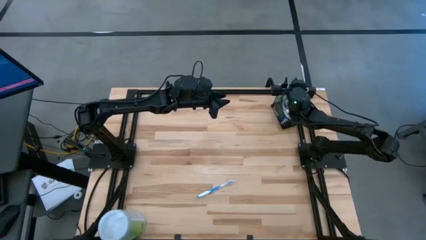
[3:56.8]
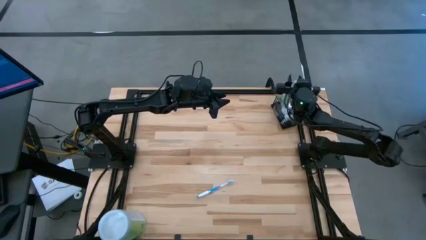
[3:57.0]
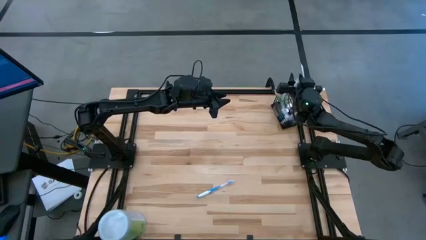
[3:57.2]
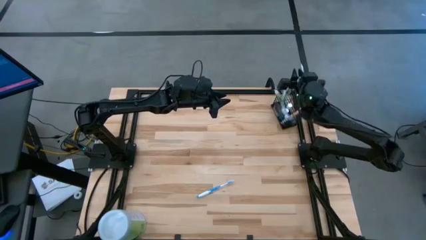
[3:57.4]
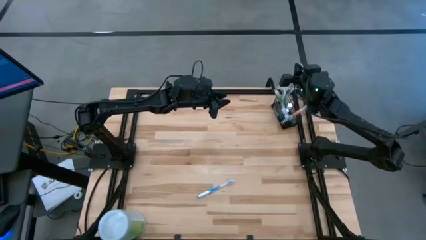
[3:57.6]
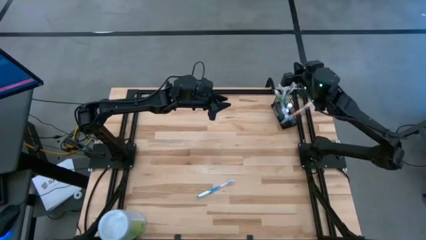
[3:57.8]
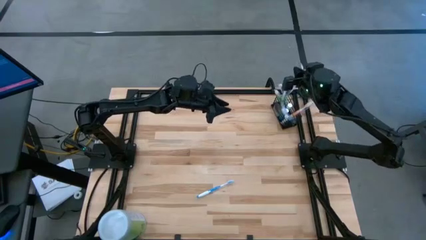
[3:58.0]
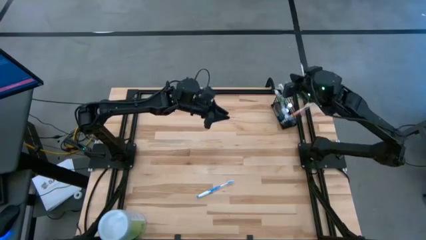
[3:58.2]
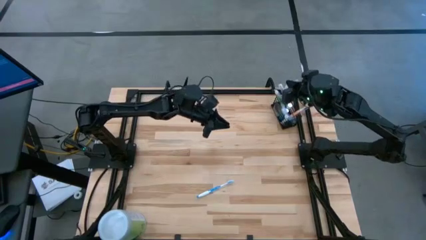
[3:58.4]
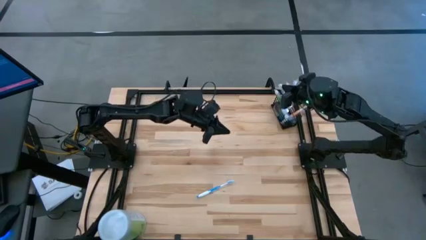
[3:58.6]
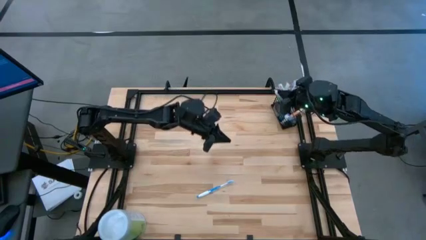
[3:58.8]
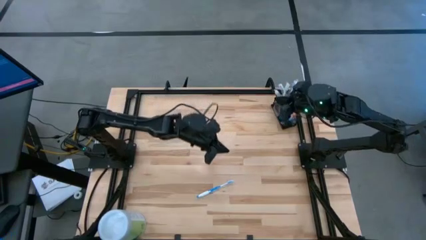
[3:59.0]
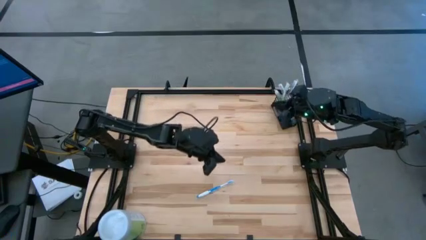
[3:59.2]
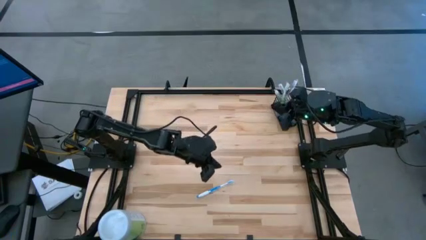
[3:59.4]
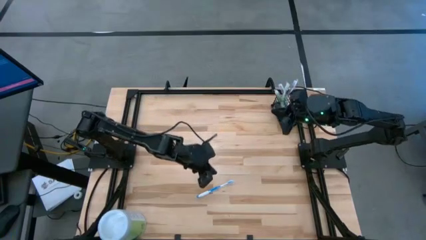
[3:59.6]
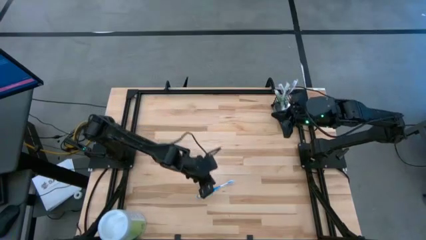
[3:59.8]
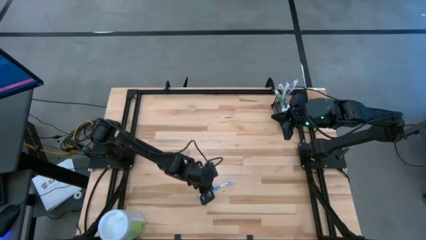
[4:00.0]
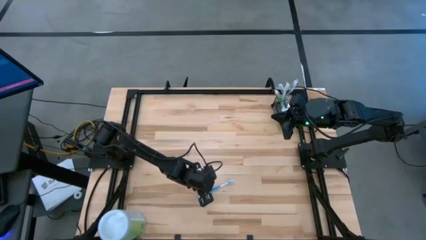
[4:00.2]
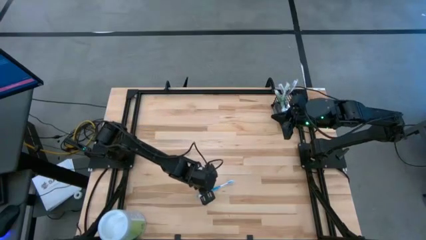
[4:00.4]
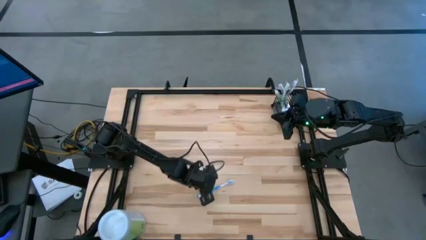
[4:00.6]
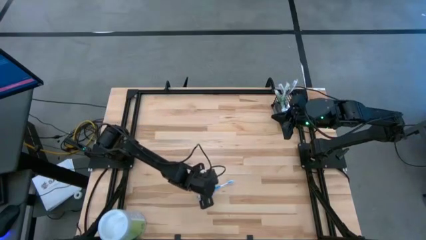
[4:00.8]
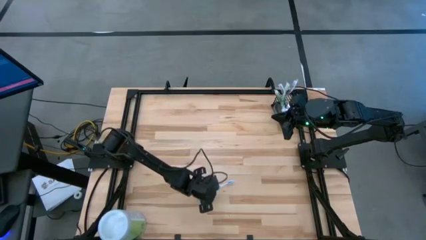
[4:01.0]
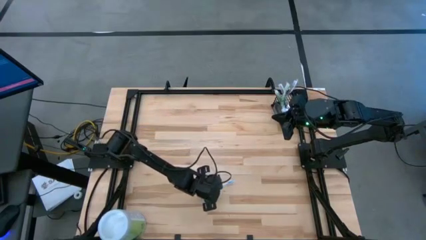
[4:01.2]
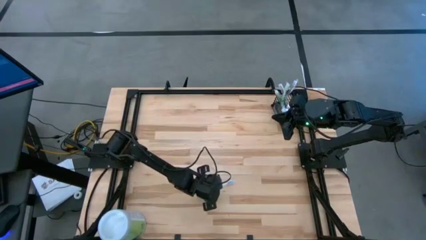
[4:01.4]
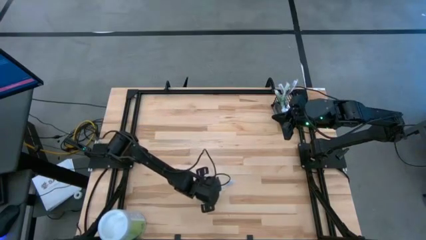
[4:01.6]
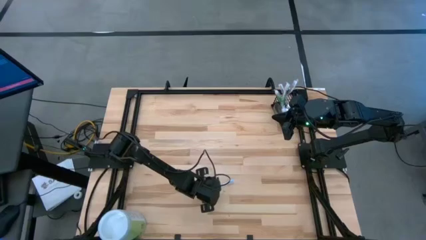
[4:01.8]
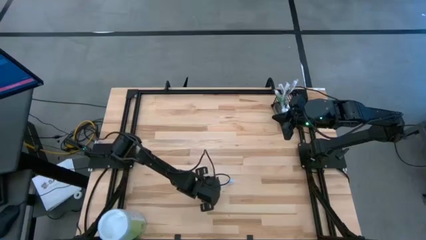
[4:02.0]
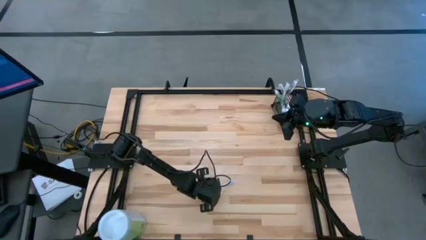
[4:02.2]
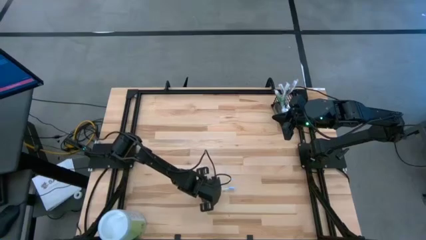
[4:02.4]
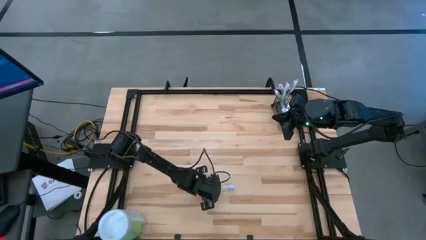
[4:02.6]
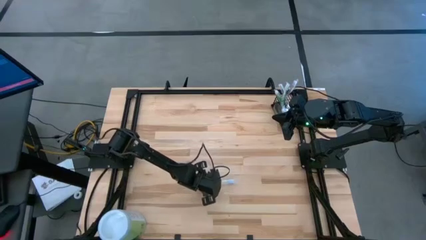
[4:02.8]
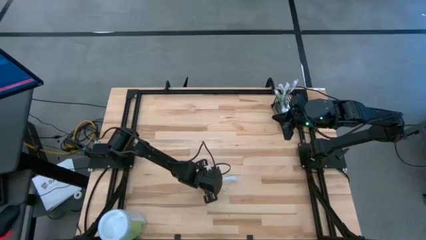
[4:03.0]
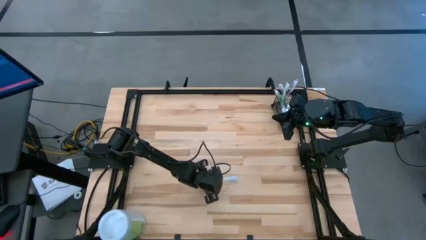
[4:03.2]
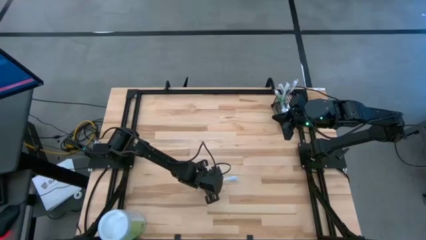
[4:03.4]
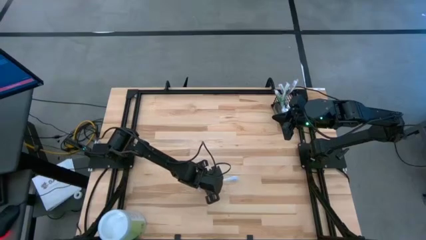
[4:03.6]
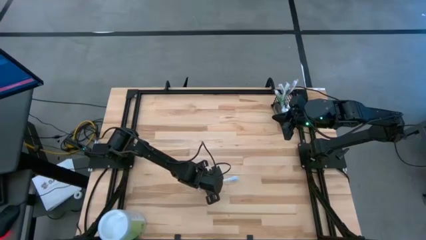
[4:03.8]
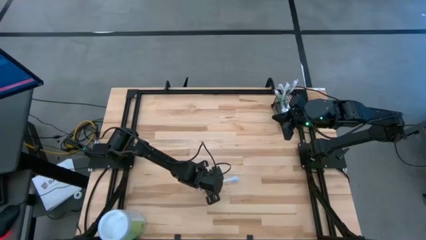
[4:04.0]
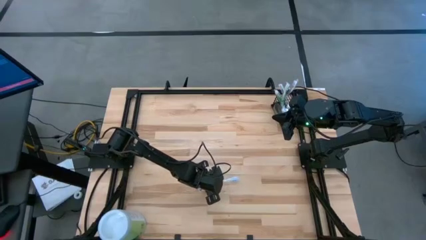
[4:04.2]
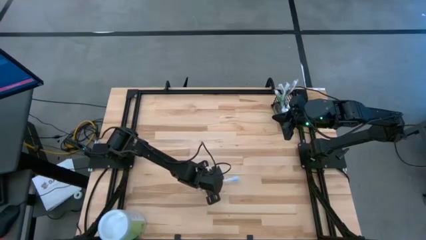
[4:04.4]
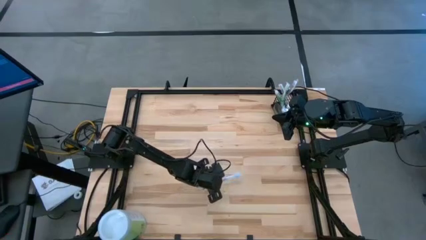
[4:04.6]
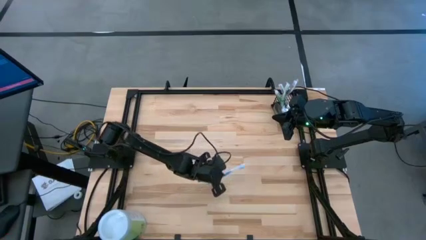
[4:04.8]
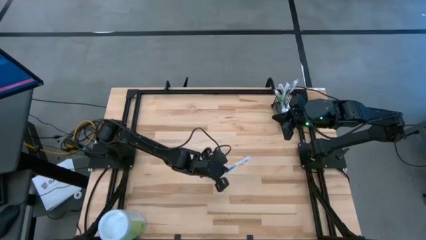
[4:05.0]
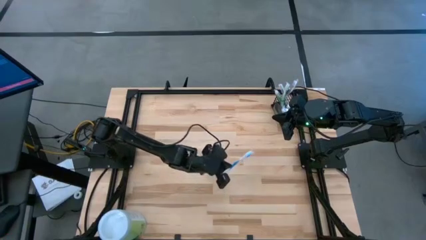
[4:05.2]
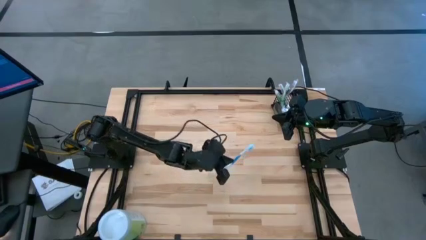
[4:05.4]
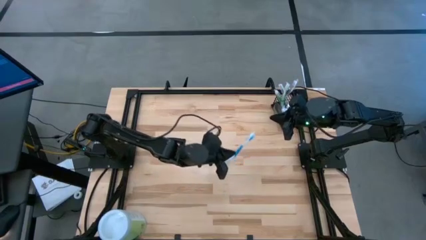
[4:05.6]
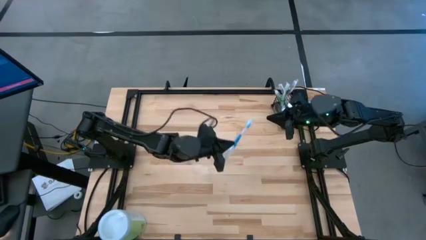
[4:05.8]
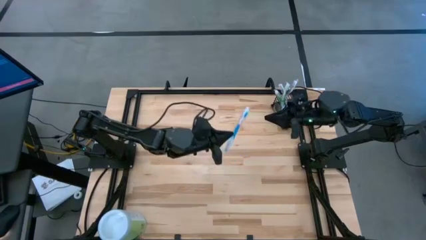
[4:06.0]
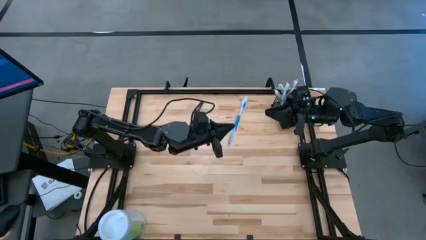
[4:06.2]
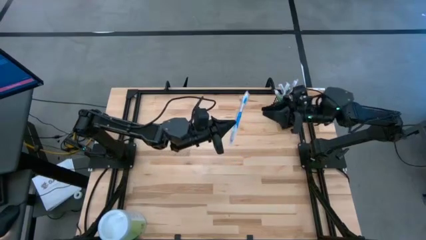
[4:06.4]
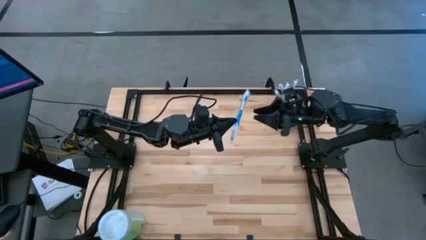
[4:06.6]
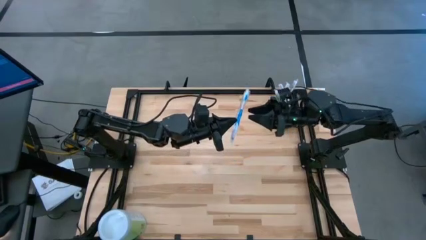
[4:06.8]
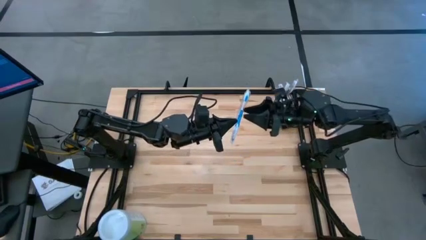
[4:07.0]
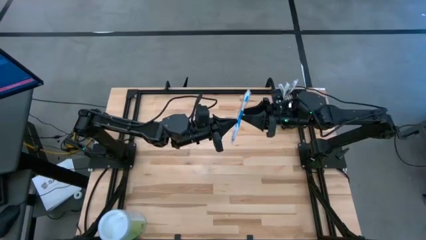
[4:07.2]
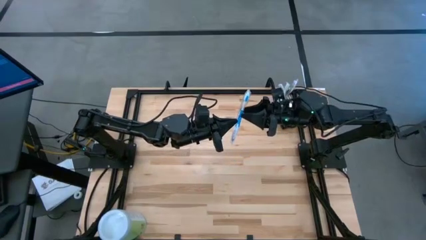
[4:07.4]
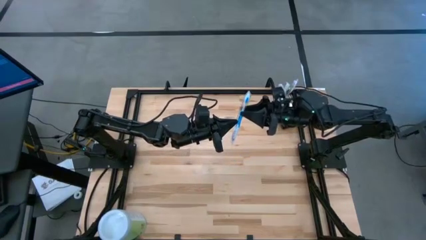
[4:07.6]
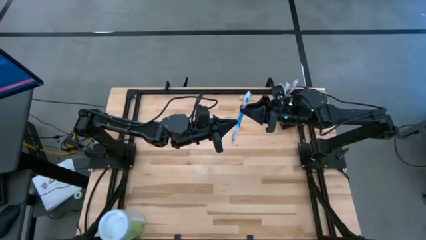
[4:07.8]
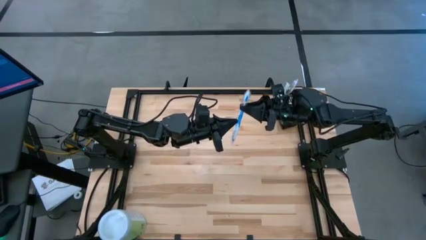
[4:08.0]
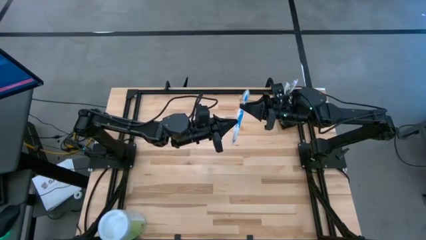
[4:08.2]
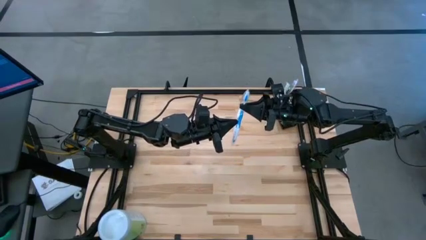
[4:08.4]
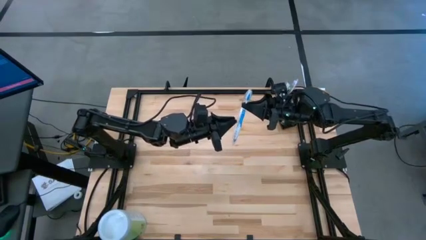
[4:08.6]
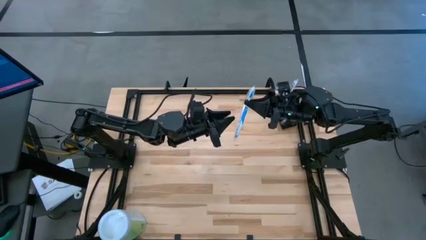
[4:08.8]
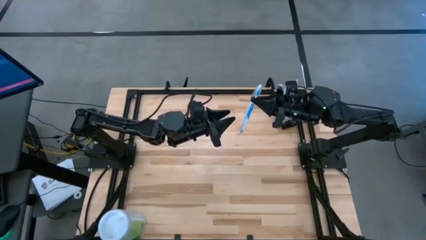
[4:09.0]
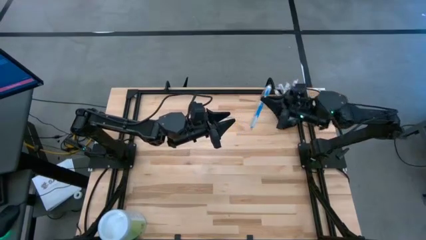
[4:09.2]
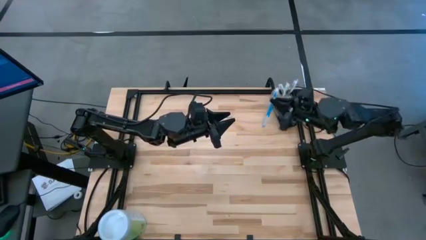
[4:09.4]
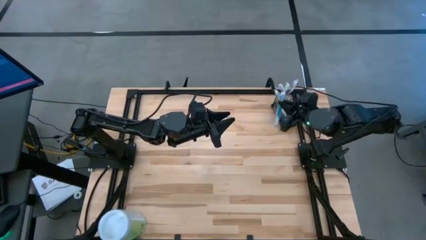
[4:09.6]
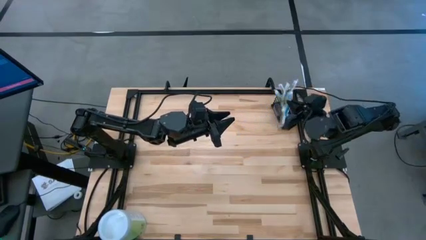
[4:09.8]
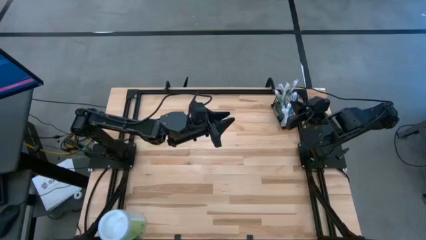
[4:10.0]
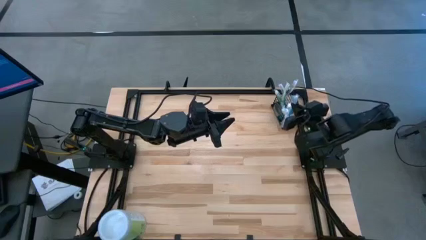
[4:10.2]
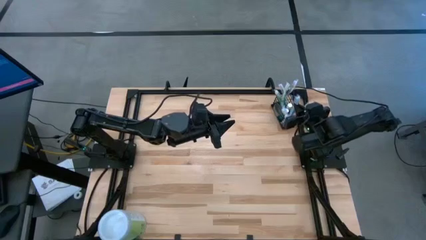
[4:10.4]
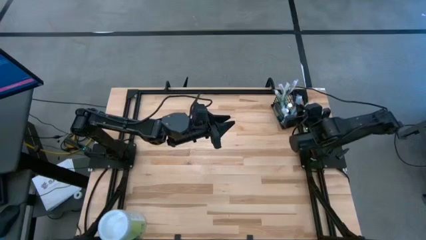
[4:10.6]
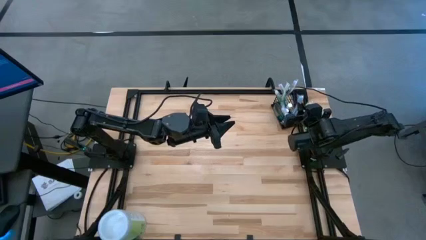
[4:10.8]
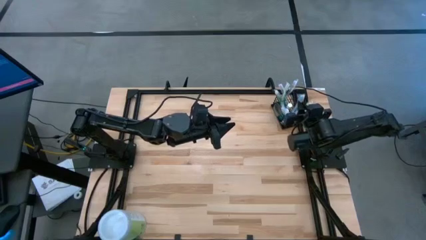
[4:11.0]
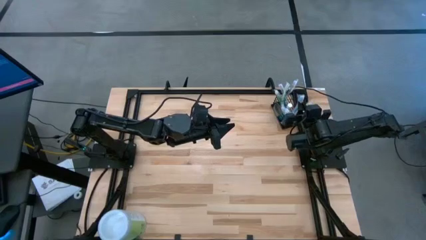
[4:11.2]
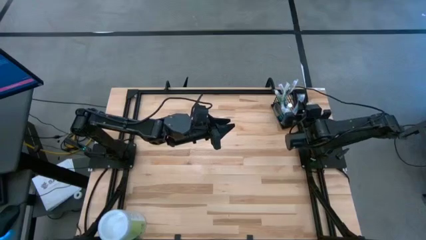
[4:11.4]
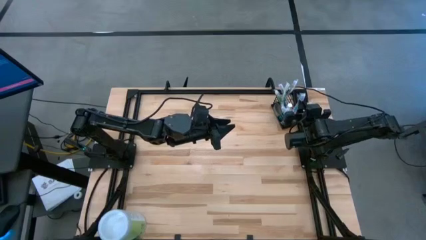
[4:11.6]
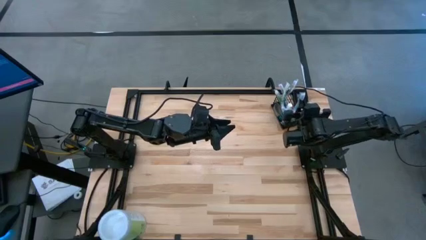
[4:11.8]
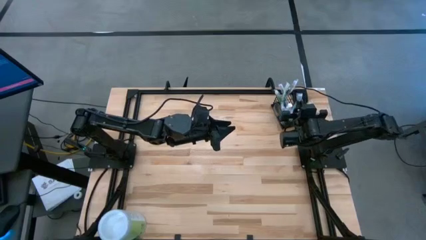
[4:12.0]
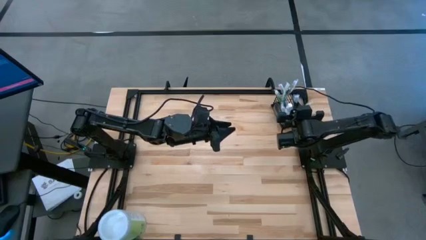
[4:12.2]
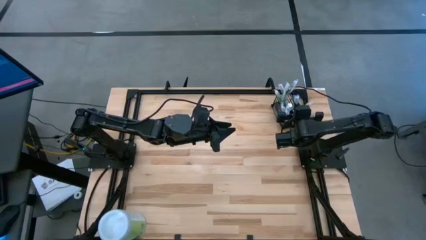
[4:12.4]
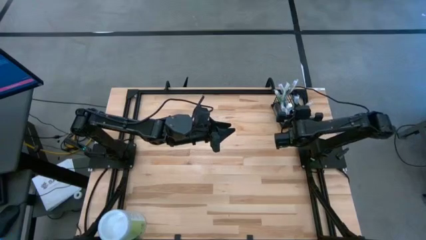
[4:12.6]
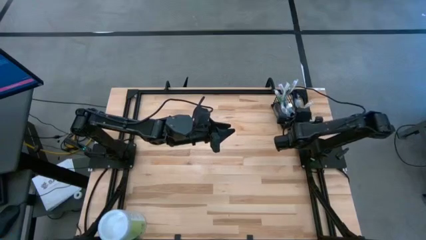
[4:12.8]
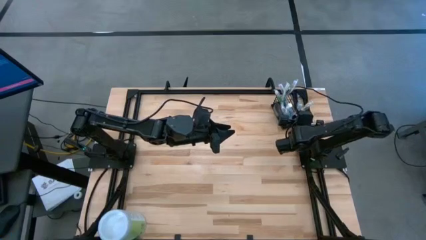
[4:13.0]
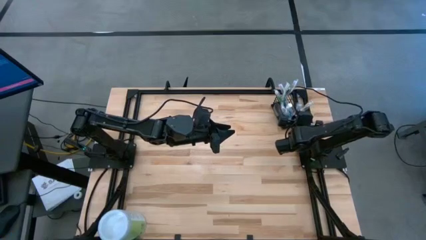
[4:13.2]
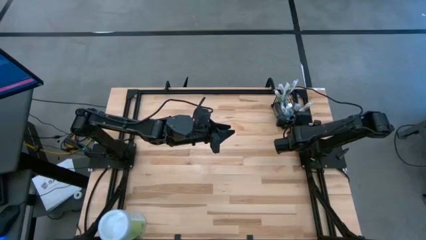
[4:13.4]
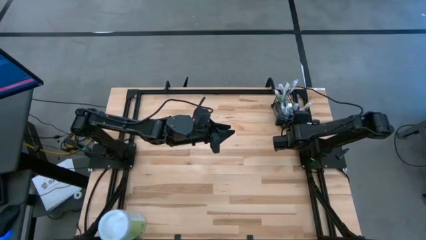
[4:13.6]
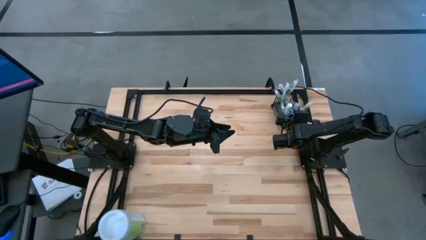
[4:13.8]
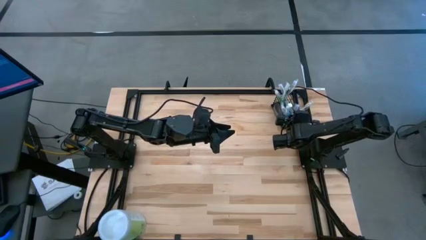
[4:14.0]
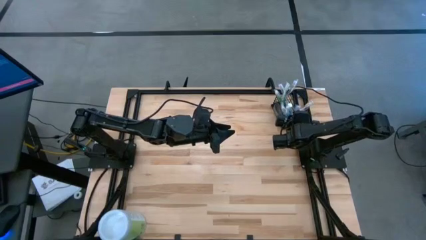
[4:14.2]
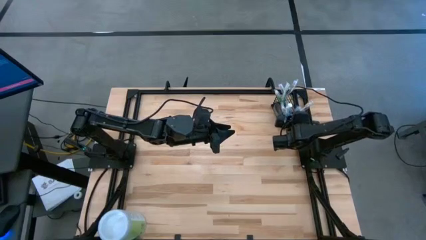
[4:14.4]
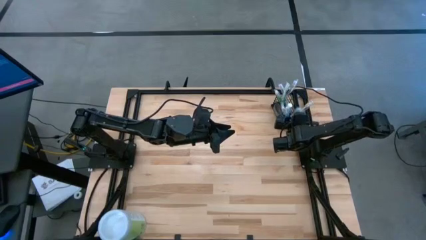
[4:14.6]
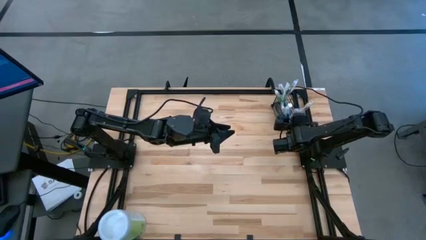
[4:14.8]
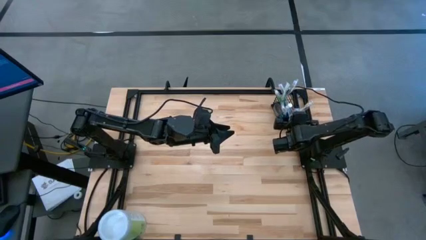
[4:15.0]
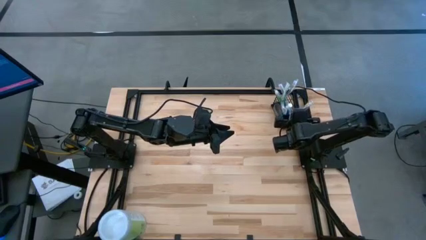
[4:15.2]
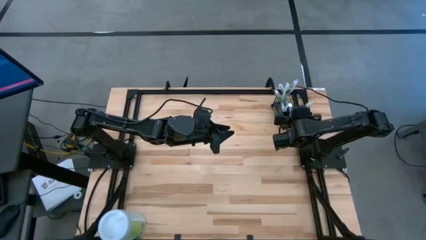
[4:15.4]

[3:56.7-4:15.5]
Task: Pick & Place toothbrushing station
Put the blue tooth into the right section of wire organizer
